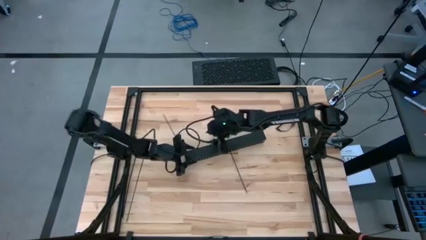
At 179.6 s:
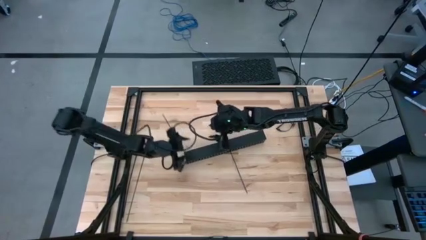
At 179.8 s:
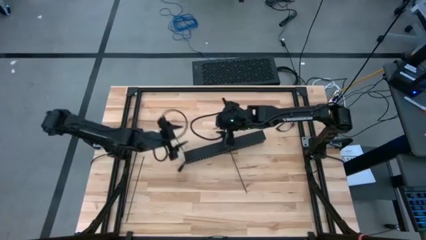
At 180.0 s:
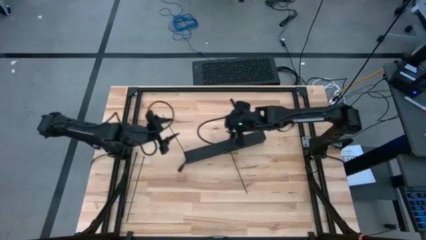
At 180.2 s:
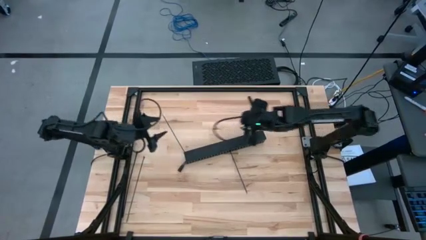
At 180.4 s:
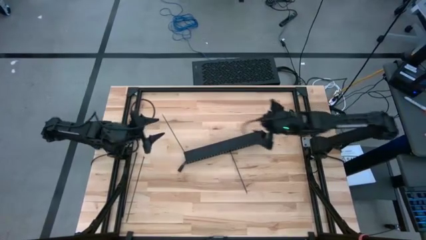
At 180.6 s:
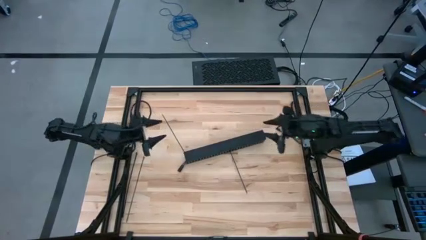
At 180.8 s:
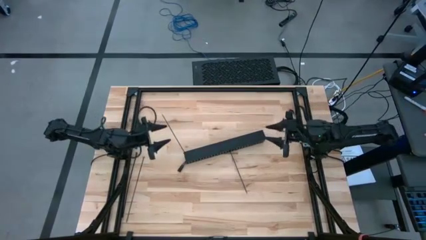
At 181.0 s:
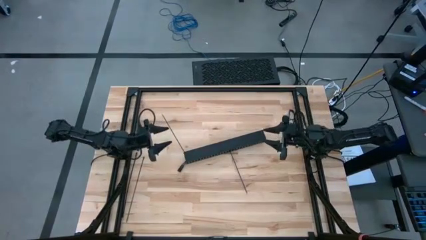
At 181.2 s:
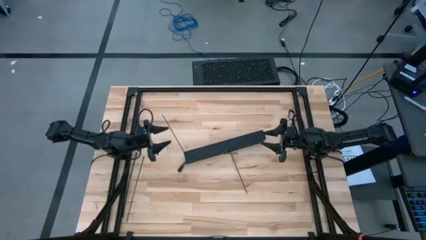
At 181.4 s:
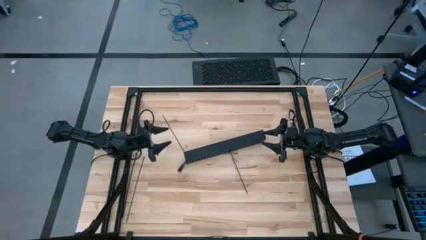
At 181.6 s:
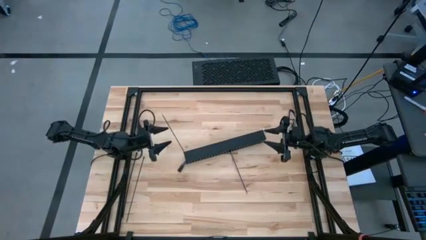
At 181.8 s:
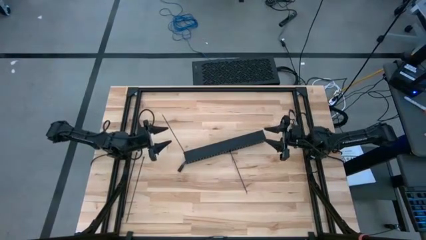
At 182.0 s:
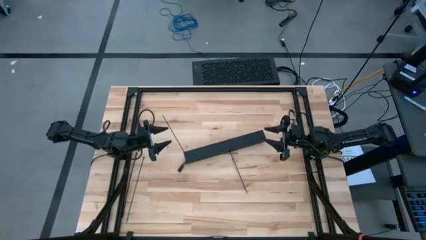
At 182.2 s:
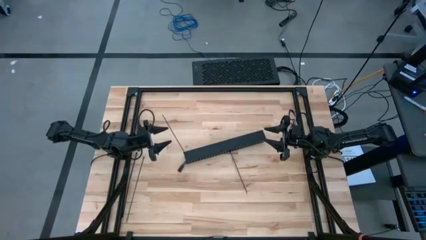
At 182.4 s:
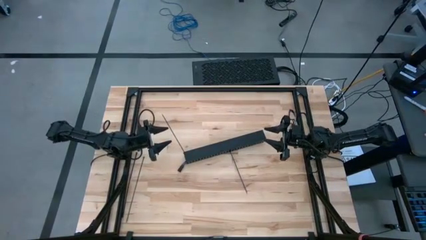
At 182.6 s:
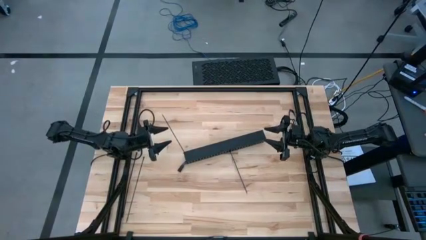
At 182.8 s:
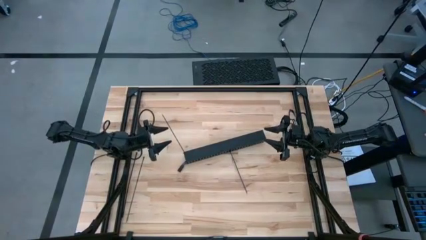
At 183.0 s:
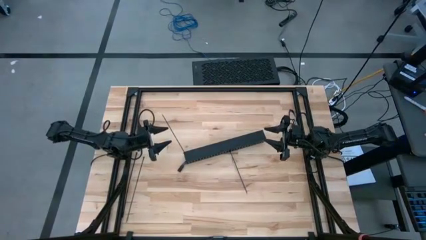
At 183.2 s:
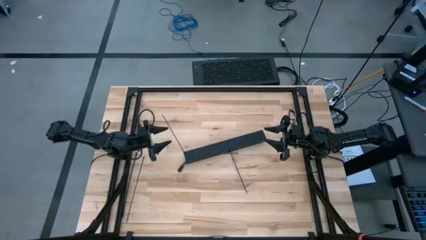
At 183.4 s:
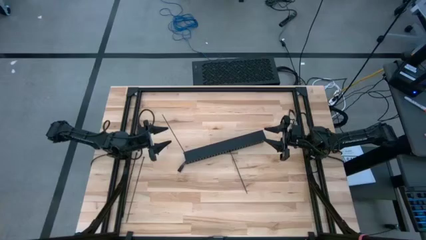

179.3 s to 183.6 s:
Task: Ziptie cables
Return to Home Position

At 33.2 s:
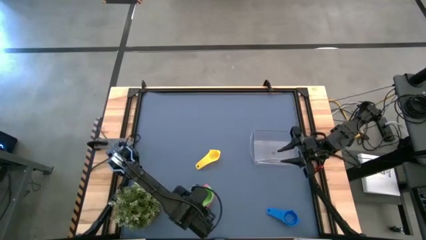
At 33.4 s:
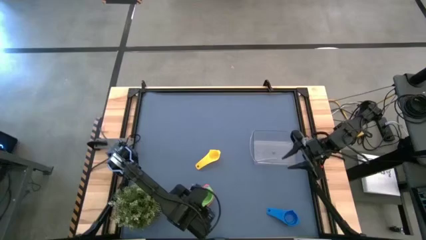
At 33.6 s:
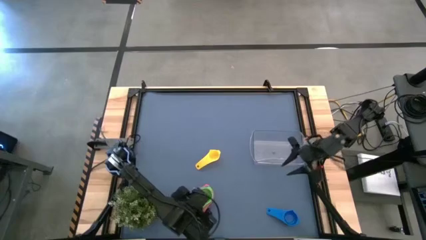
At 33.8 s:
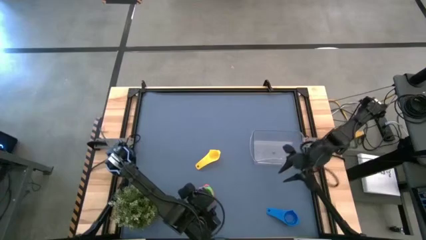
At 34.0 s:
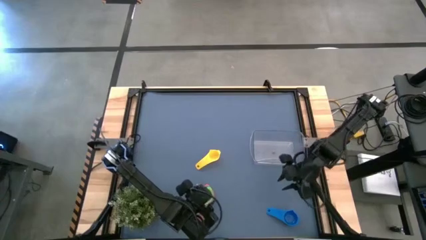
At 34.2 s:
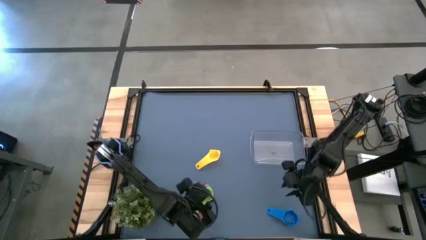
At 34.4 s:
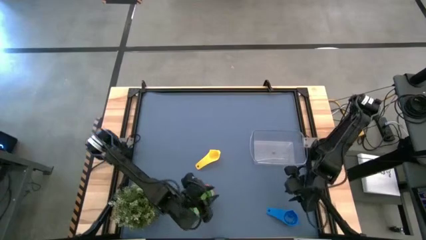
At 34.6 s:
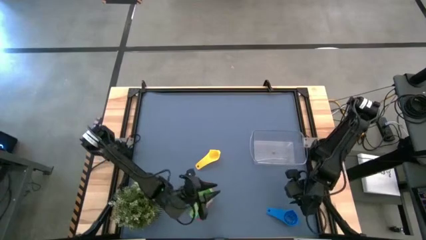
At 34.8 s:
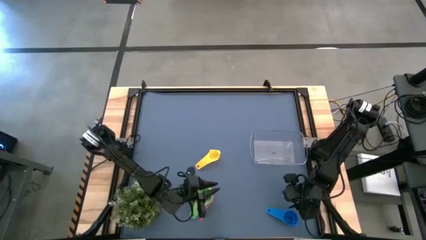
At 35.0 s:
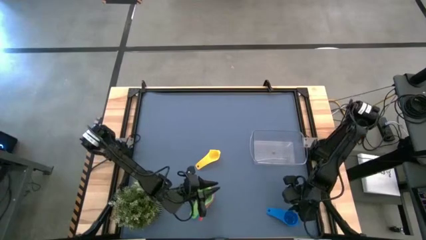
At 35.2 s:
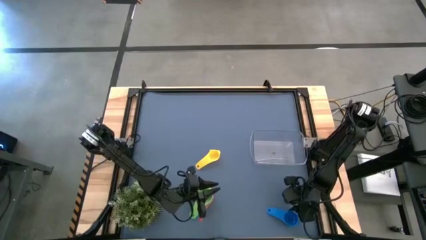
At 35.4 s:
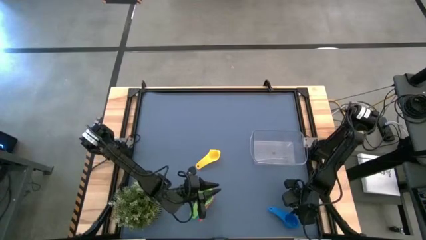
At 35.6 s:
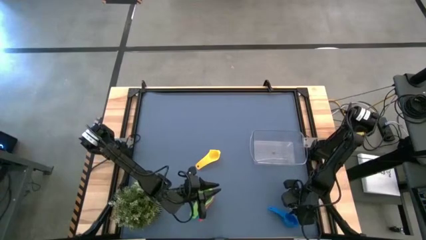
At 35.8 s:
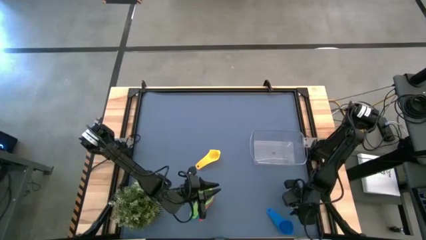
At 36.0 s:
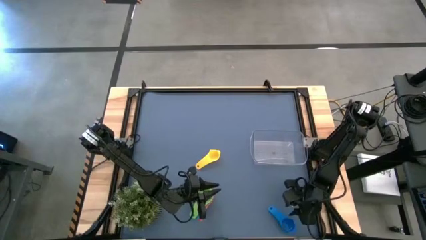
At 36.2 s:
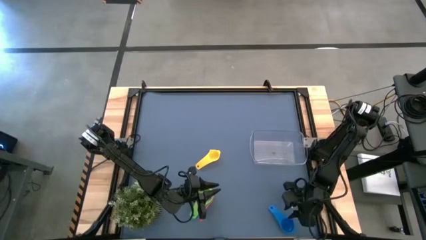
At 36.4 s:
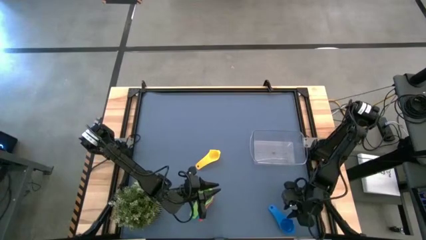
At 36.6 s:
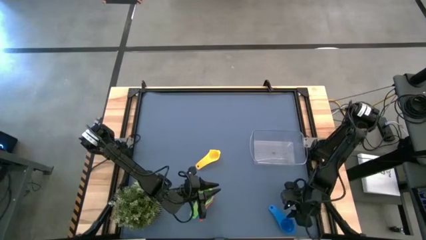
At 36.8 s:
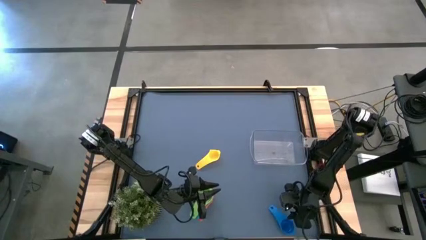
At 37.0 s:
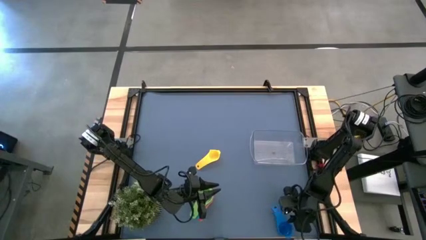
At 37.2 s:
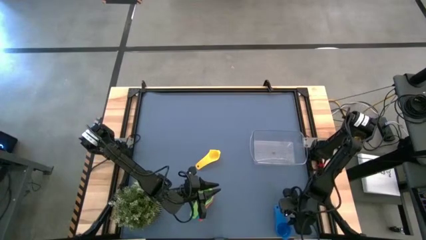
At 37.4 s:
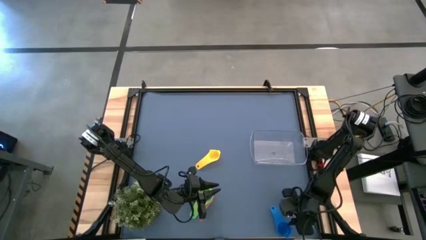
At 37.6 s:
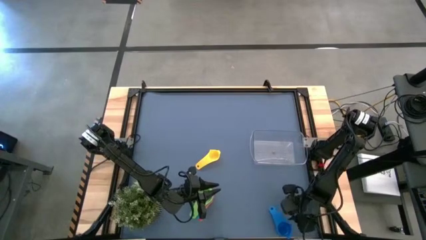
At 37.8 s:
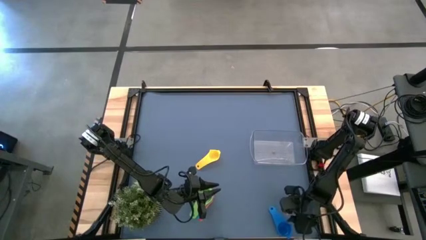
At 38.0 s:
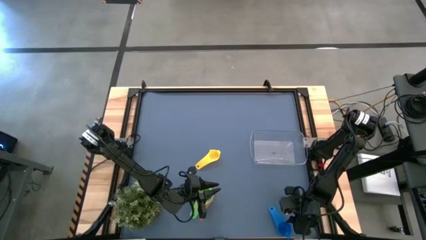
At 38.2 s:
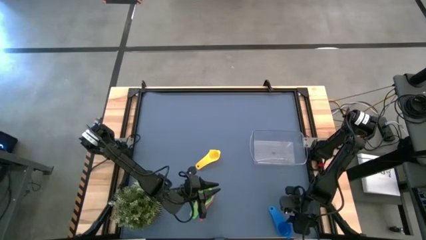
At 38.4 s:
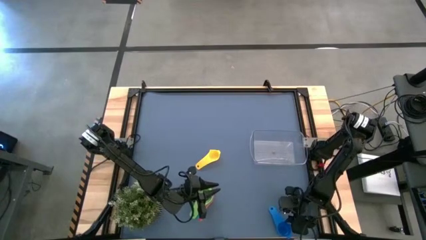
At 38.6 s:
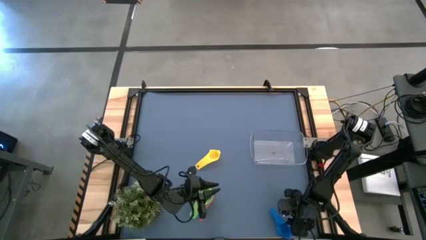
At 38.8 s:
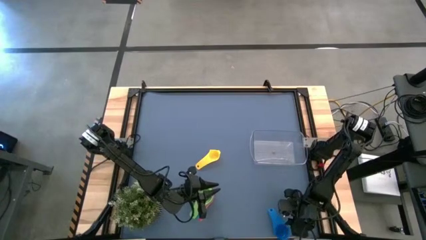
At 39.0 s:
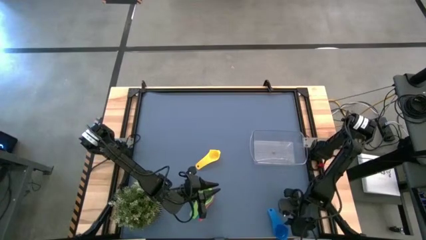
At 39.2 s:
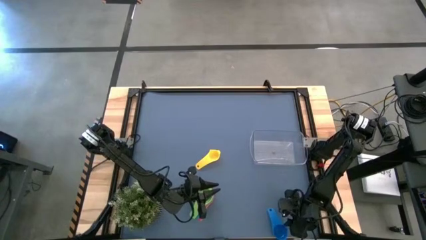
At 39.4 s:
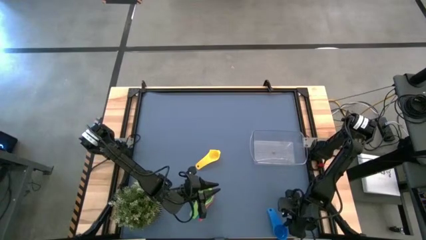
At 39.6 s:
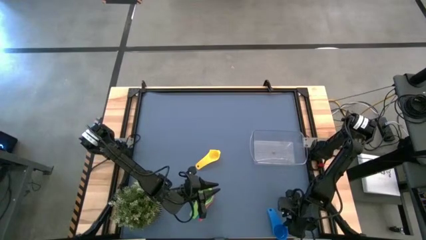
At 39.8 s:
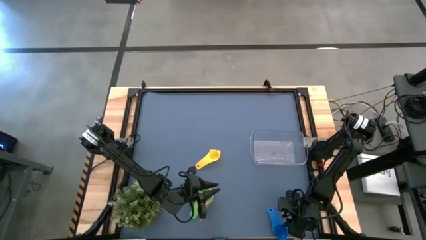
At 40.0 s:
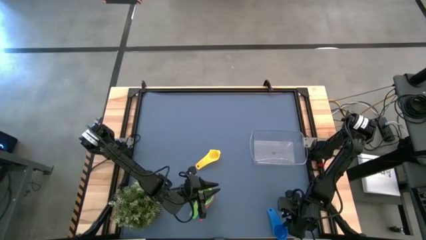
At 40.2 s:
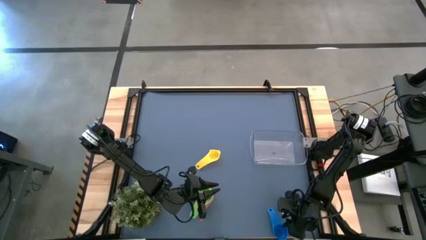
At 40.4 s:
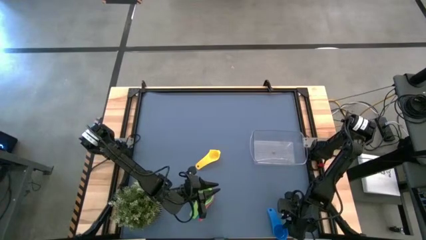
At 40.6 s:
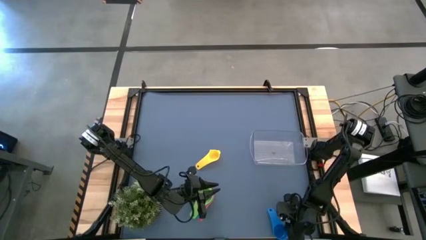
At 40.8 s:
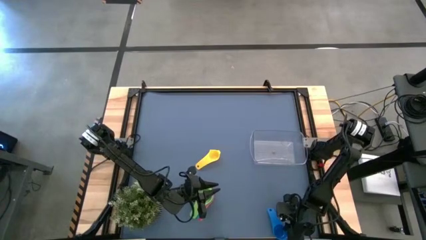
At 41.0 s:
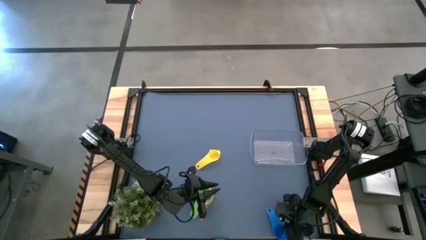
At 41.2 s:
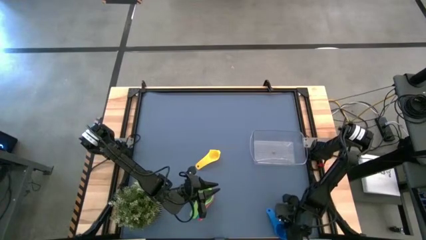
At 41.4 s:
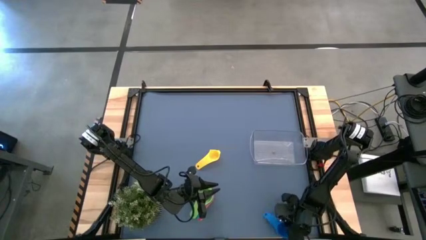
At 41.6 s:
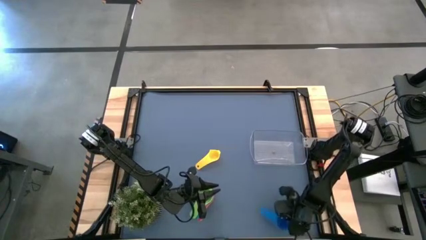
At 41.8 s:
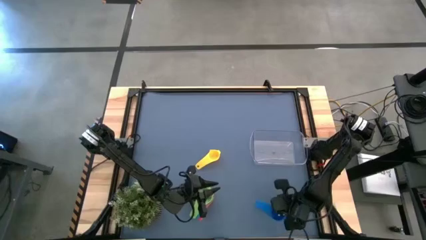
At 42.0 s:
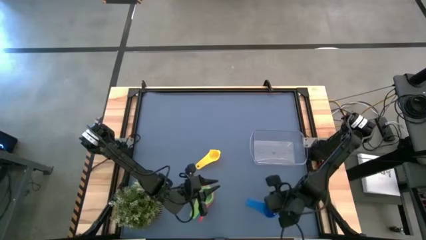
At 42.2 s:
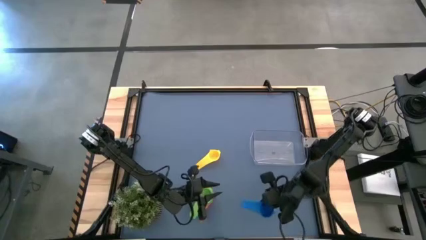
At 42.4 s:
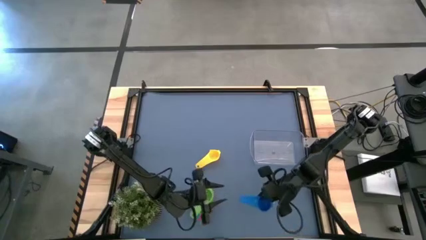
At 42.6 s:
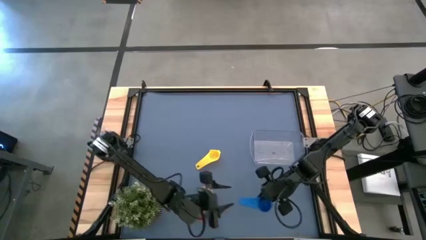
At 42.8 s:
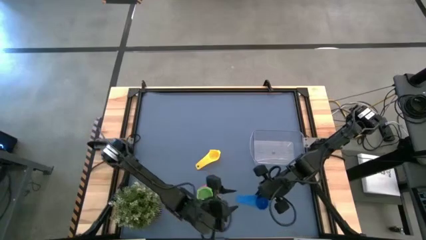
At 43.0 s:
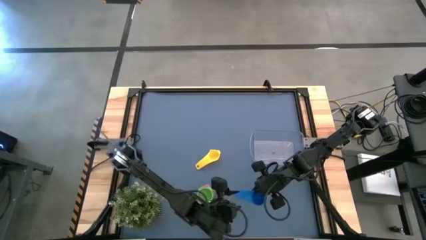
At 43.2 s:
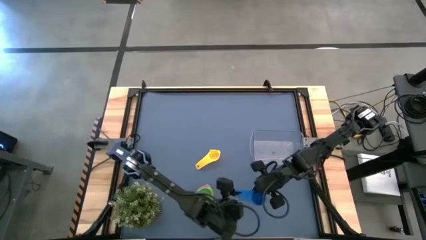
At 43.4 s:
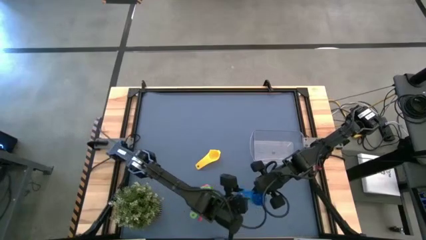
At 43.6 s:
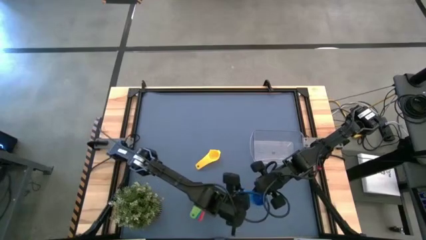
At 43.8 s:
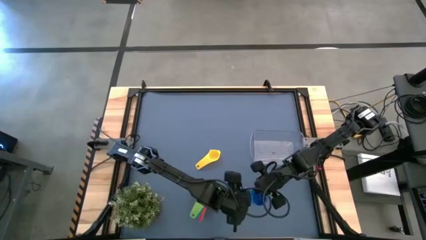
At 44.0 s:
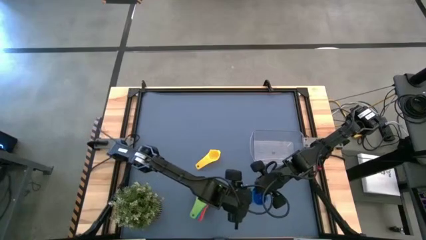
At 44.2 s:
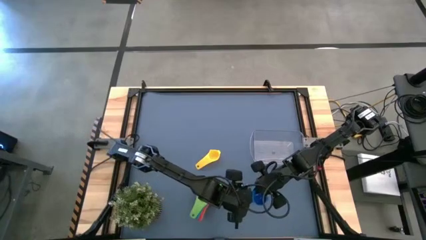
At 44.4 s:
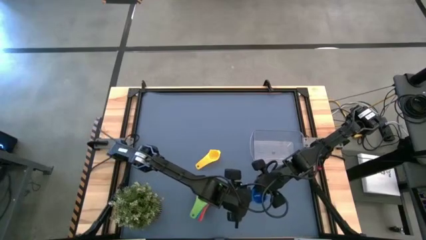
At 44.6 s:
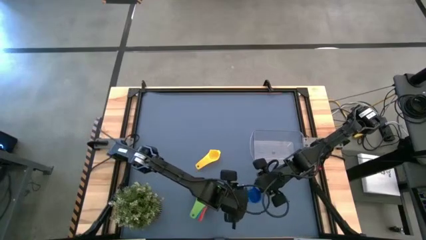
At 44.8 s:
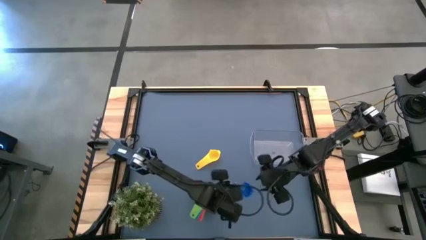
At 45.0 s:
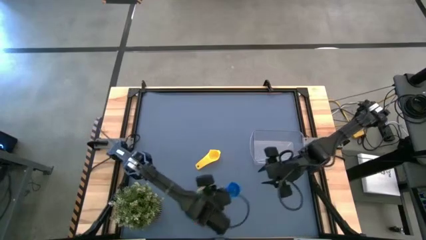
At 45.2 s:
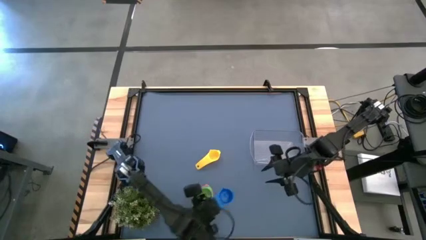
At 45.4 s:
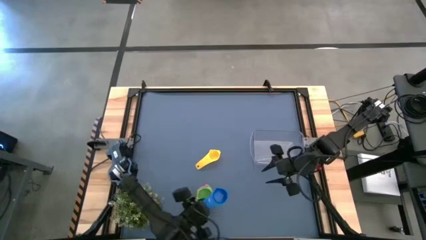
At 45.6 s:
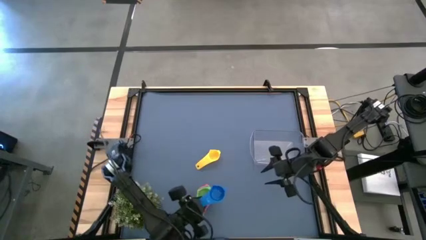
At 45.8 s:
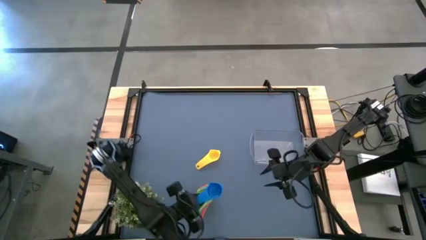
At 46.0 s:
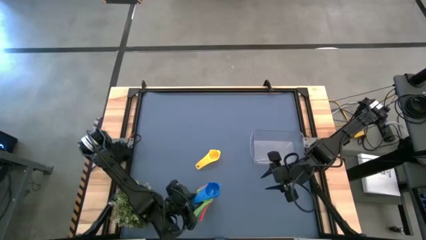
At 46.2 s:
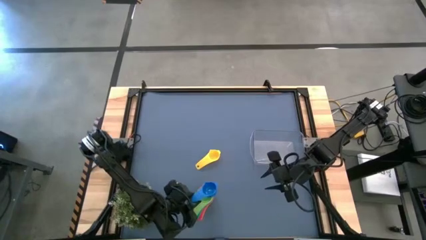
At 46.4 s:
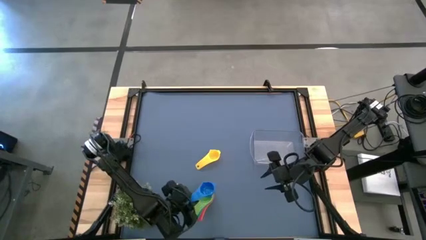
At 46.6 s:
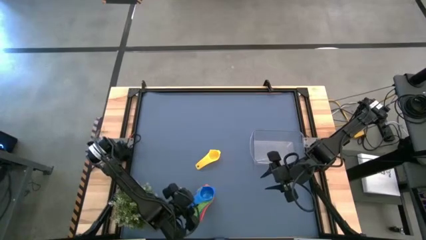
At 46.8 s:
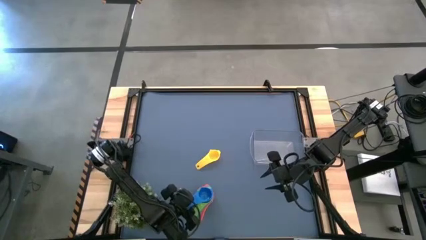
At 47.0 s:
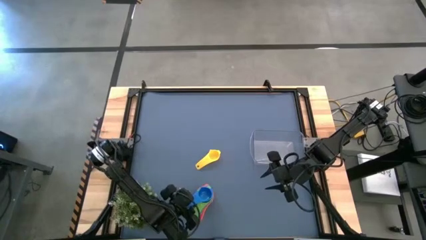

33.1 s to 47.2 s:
Task: Nest measuring cups in basket
Stack the blue measuring cup on top of the green measuring cup
